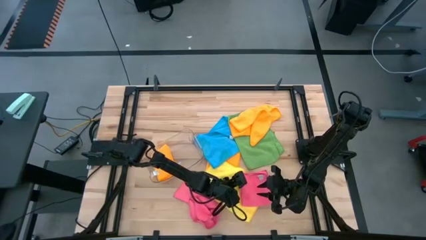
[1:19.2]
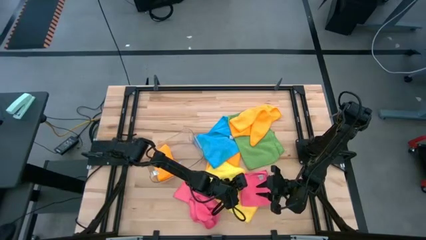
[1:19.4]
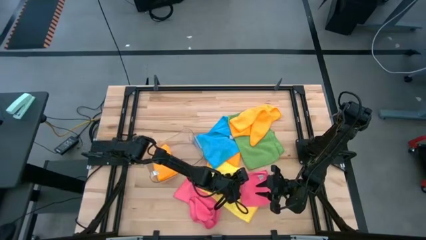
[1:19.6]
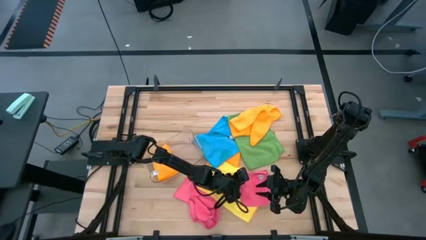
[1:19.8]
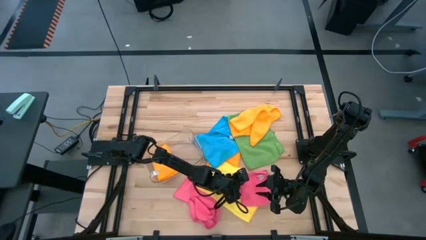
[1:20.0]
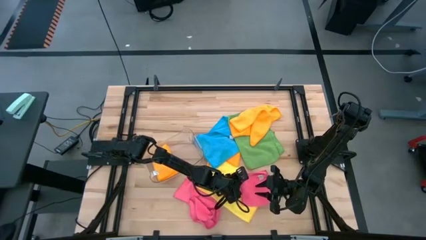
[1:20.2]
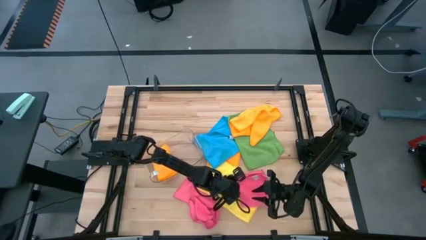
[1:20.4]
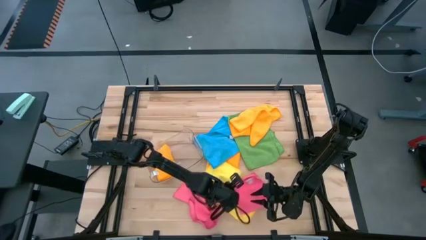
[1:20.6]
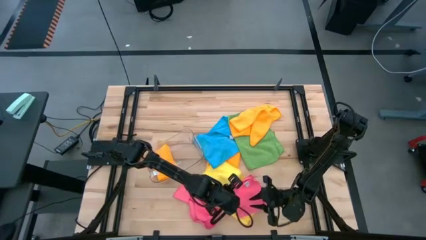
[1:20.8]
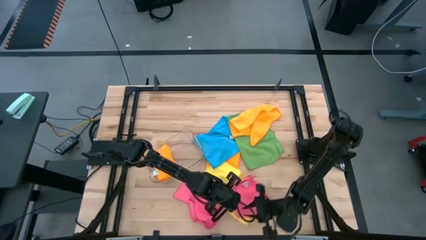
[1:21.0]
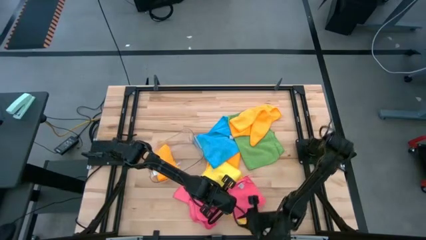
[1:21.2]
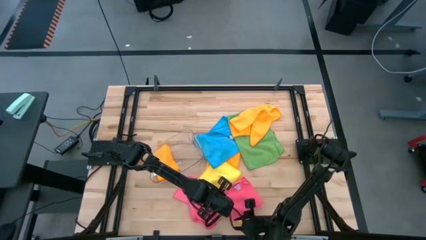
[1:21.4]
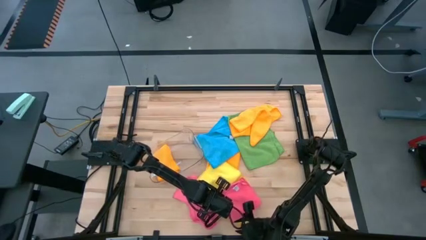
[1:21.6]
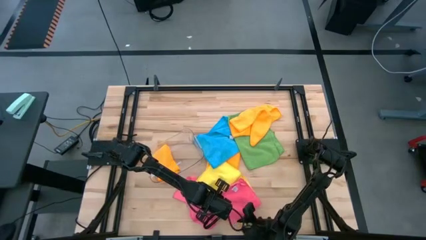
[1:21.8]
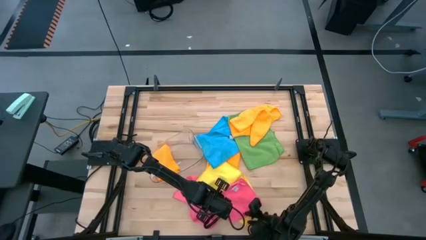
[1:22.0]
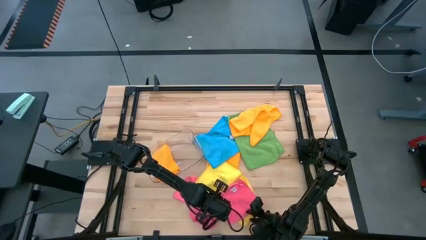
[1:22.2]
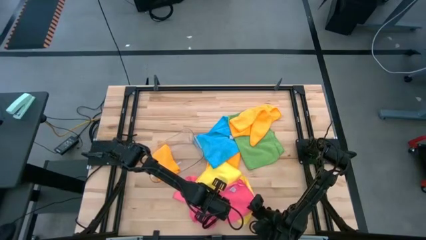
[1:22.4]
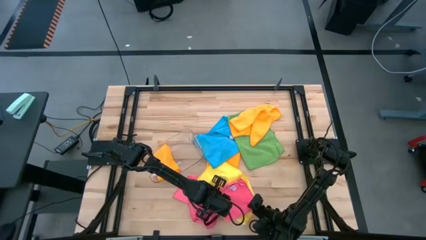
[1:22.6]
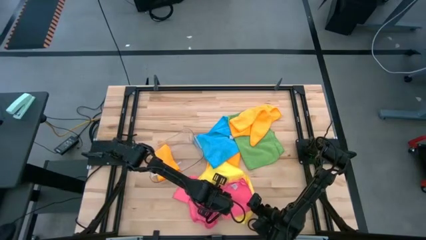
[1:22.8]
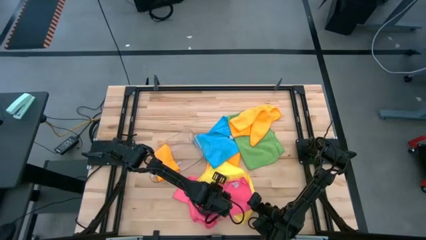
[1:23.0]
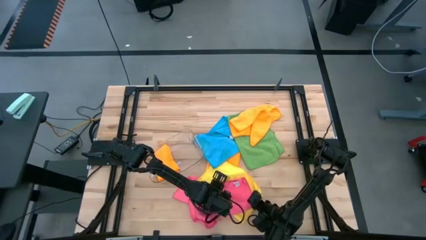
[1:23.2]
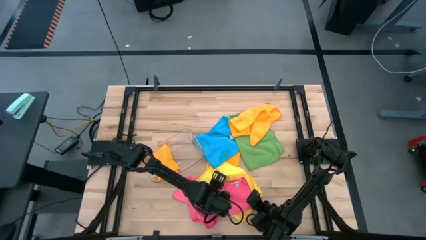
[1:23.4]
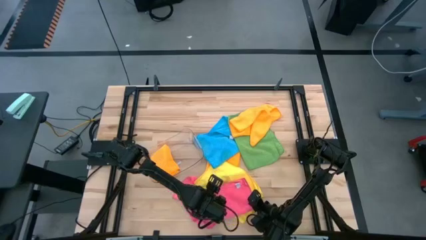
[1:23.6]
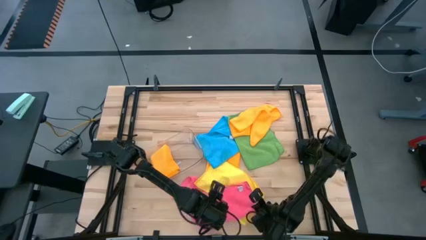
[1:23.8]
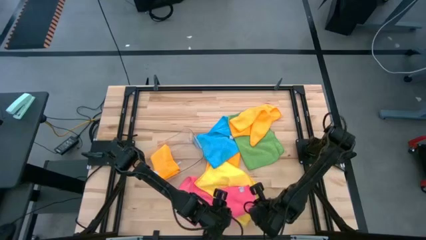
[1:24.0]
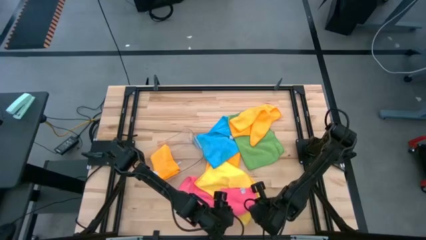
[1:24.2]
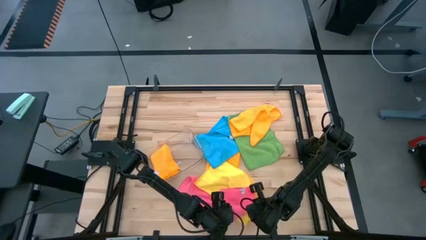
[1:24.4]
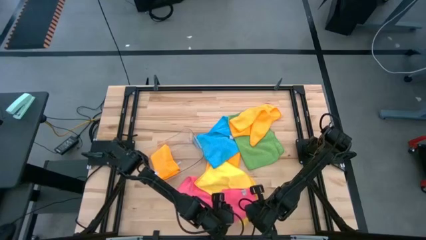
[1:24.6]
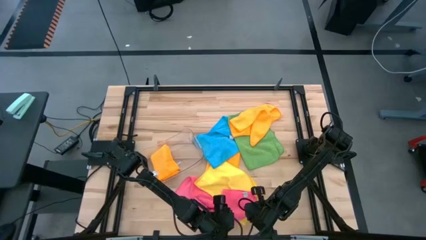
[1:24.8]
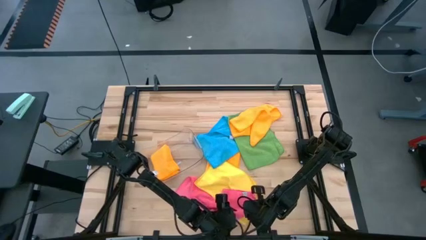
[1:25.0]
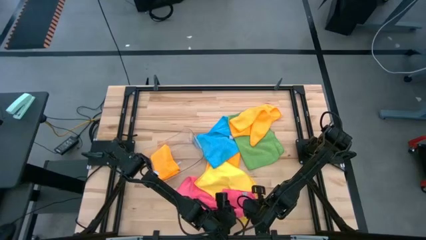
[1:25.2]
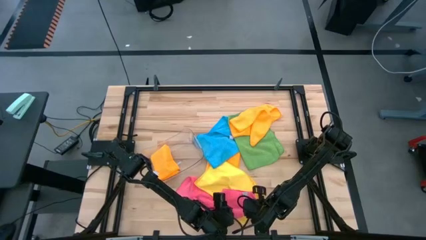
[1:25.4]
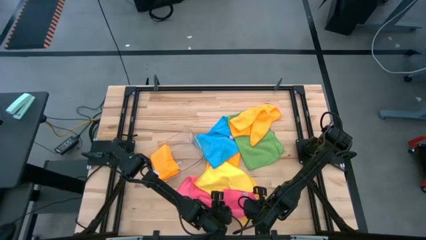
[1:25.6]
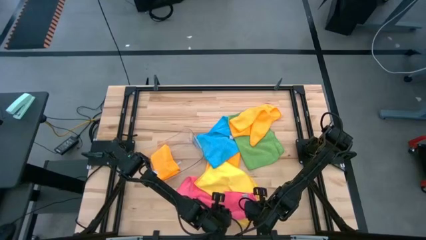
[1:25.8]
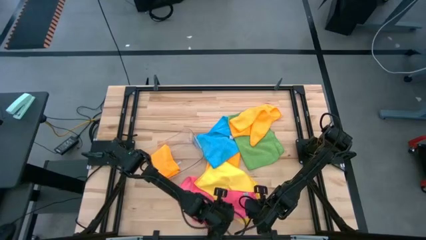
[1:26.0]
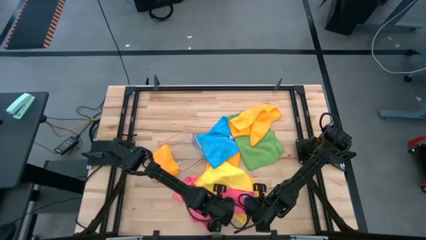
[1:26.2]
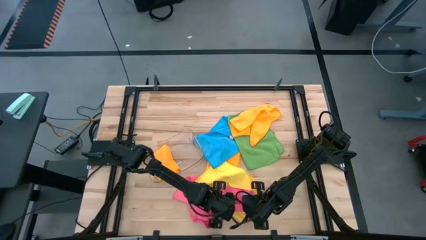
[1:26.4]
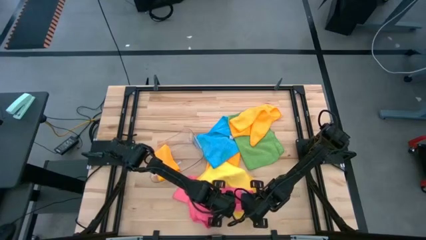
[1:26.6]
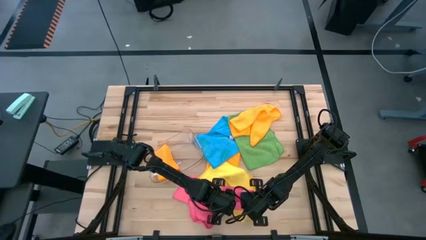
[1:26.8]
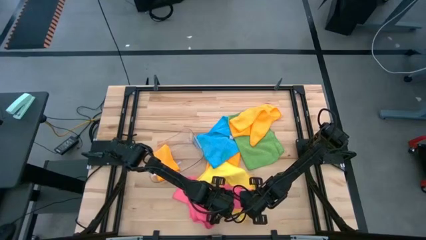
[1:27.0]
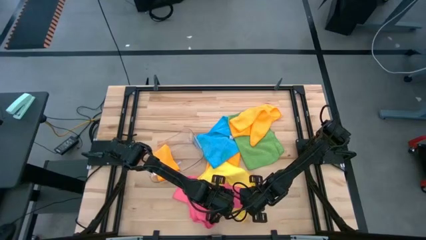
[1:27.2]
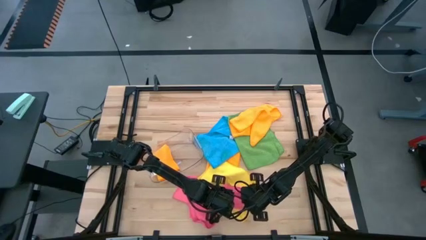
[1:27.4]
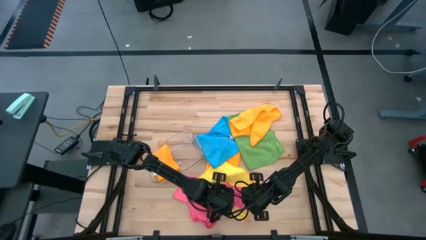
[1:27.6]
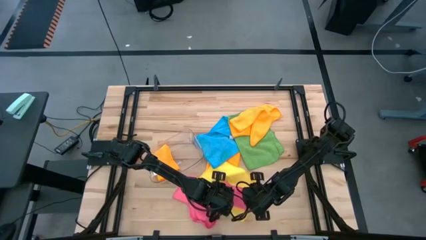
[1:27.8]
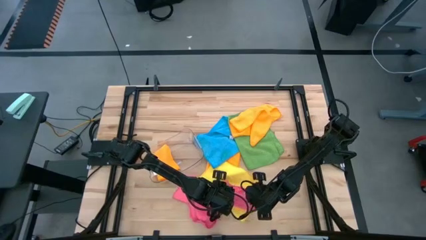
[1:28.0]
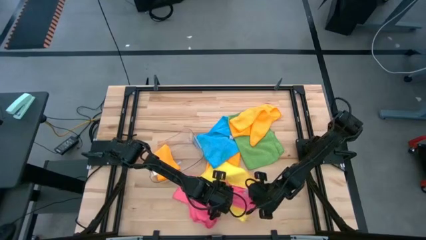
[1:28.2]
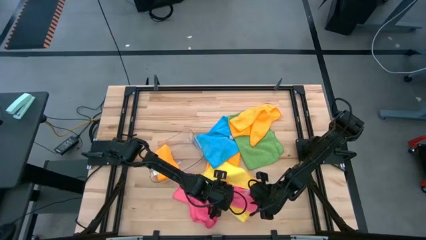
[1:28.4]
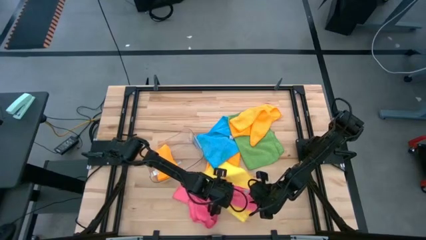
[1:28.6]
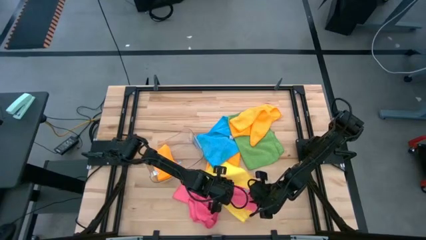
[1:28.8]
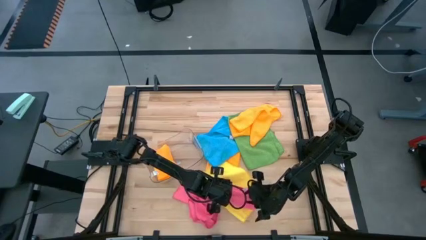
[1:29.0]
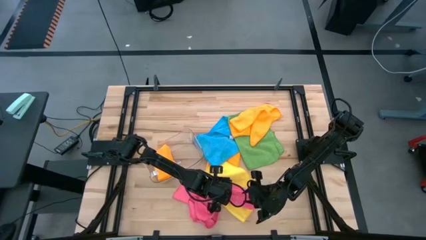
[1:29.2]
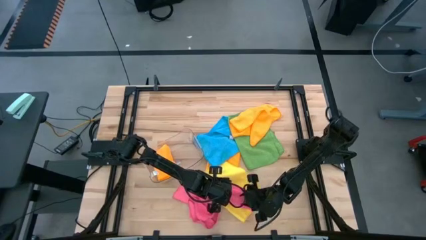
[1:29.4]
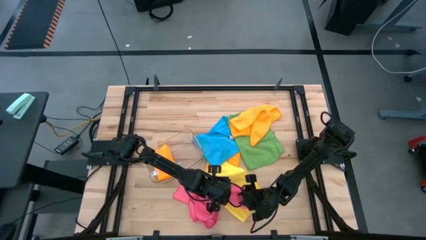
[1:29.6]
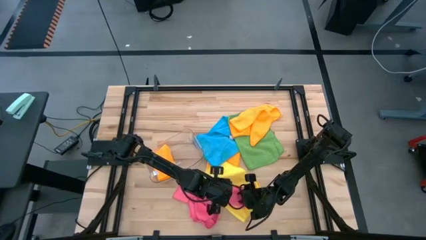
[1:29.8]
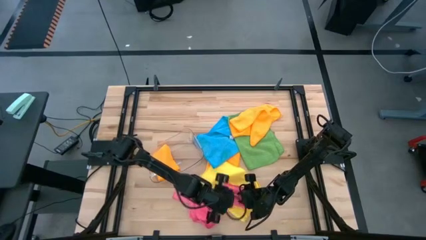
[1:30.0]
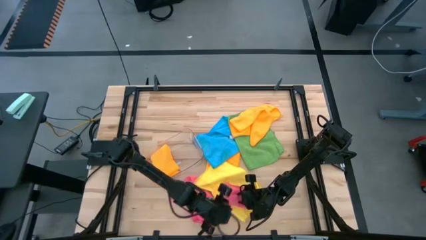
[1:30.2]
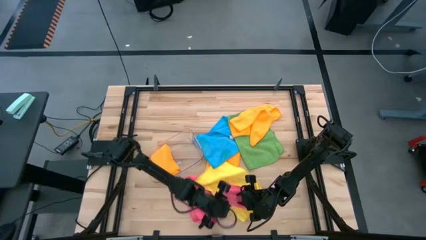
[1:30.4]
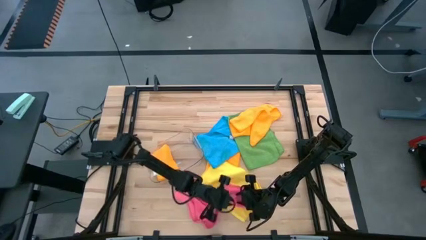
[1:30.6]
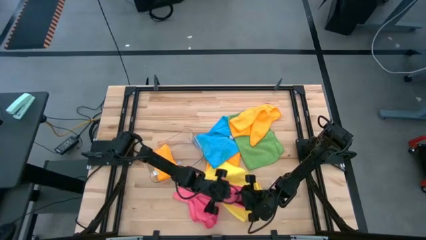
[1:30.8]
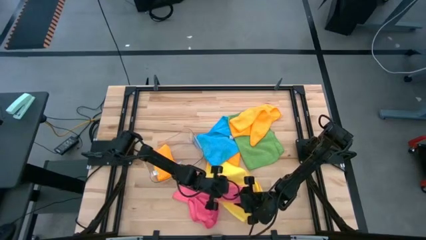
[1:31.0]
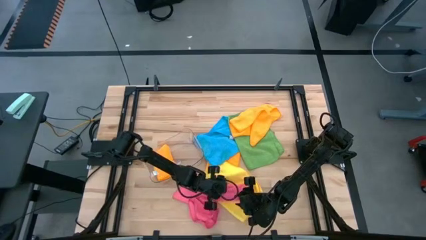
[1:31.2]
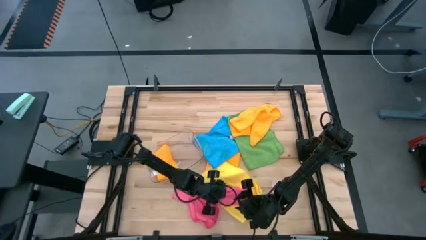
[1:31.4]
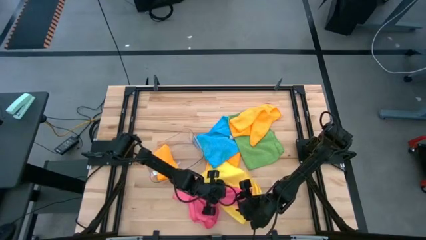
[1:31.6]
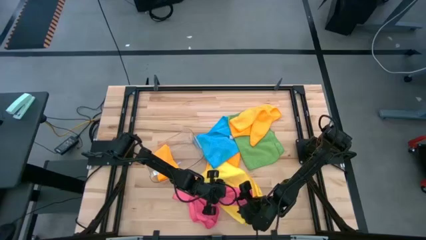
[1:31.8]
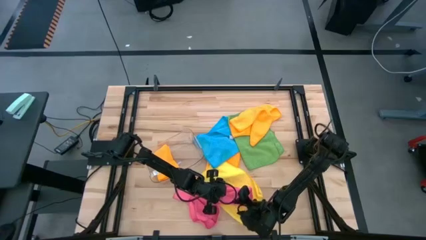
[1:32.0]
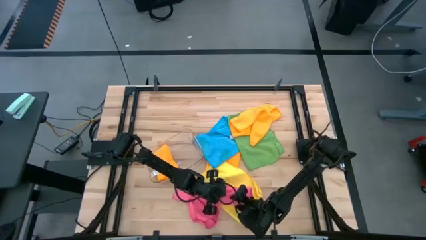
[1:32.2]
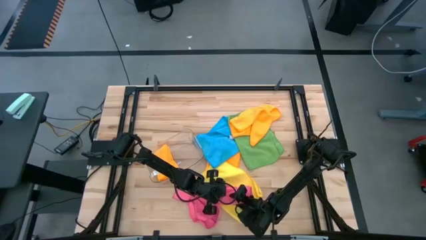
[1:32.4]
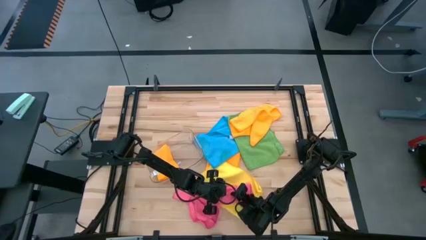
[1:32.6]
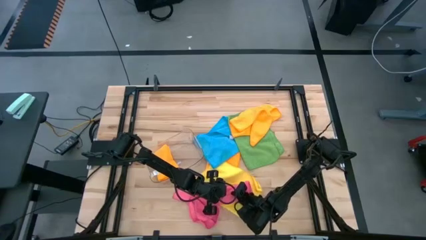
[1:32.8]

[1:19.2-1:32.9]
Task: Fold microfiber towels
Fold the top pink microfiber cloth
